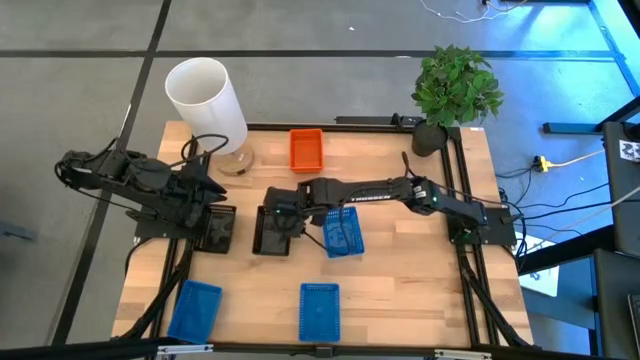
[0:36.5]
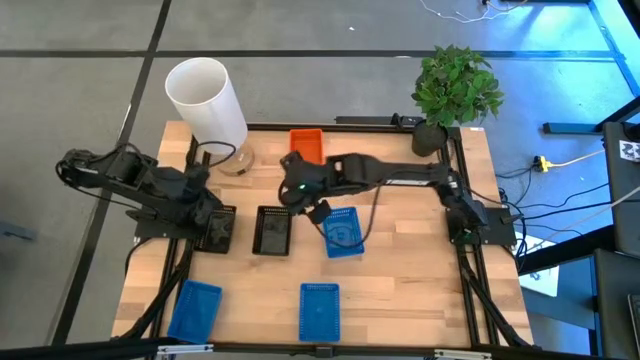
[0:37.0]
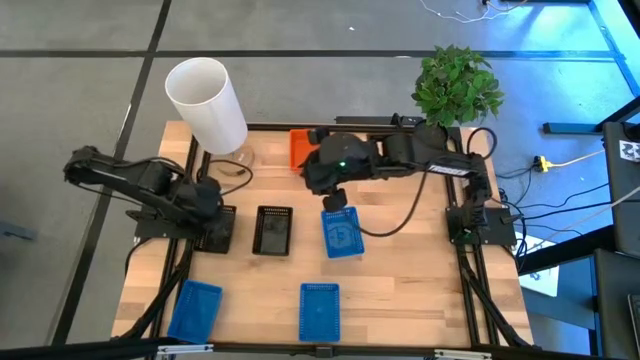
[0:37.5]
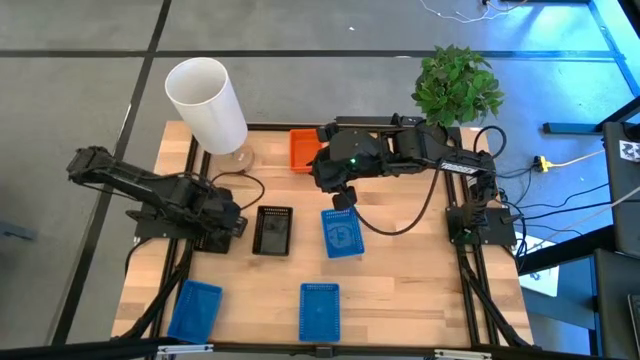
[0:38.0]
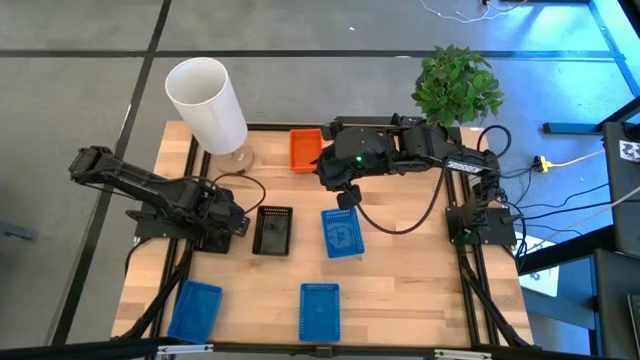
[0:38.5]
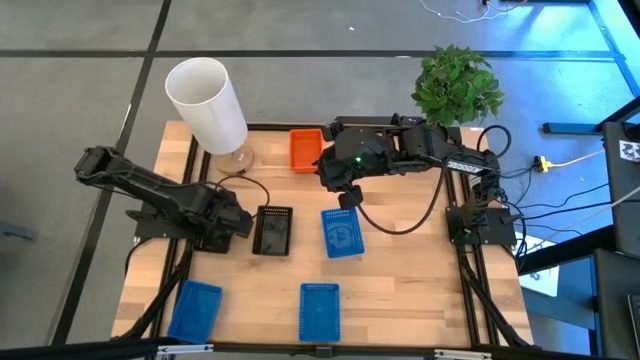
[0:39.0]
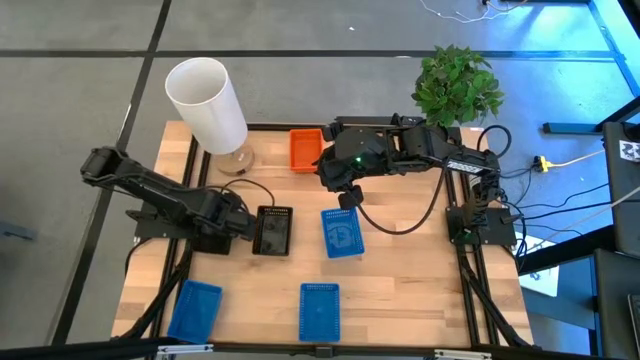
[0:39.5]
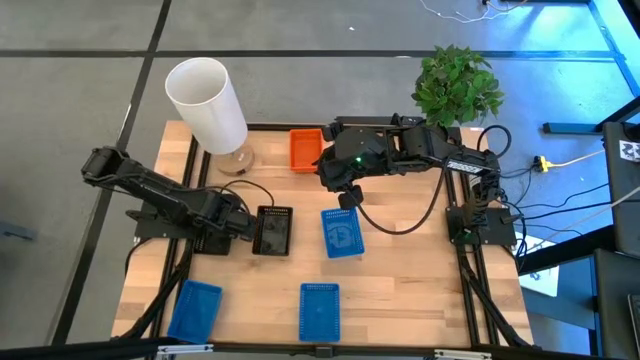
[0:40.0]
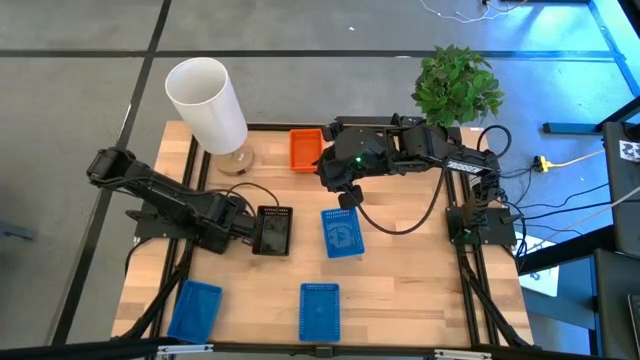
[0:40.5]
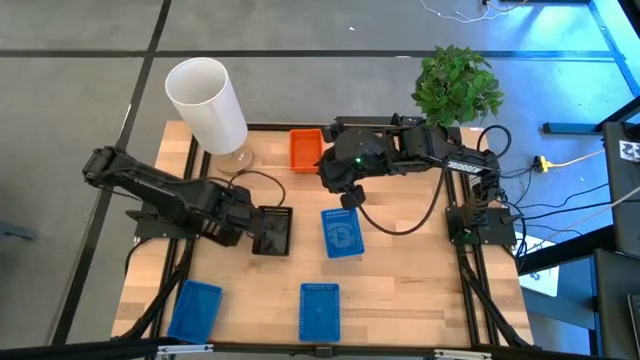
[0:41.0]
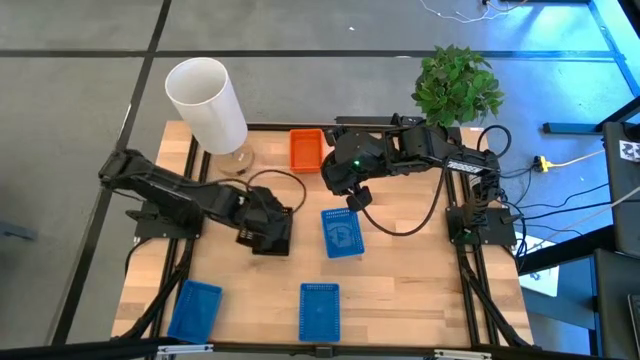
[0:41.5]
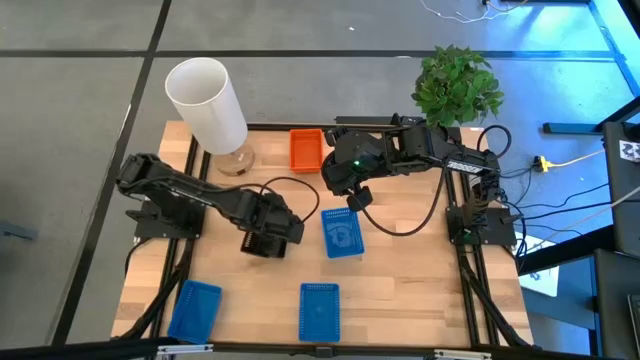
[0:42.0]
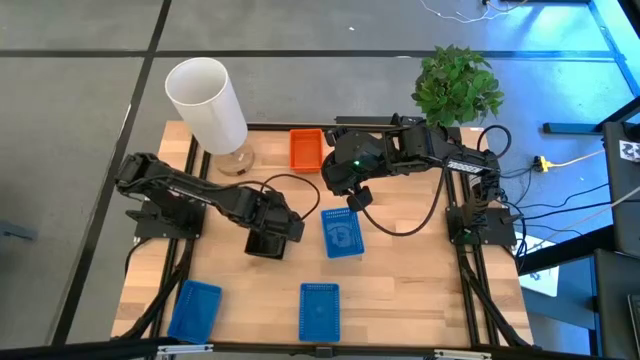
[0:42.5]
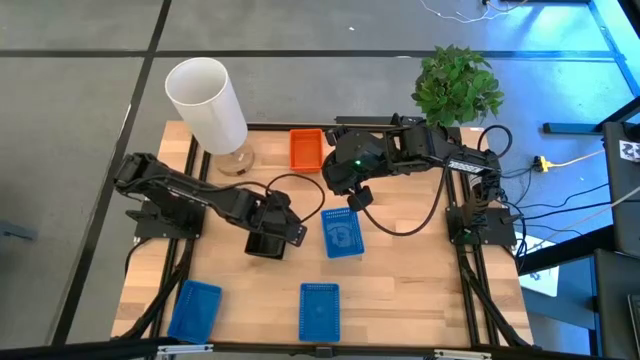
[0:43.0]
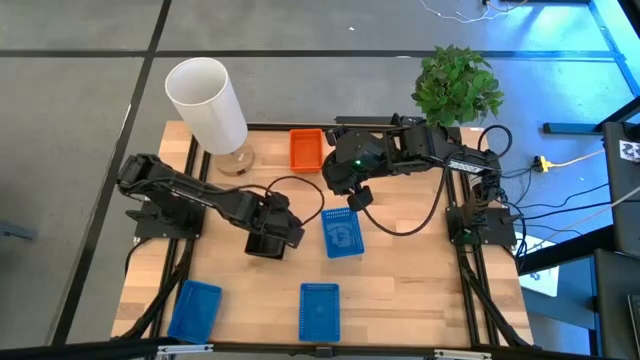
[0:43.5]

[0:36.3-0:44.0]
Stack the left black bin on top of the right black bins

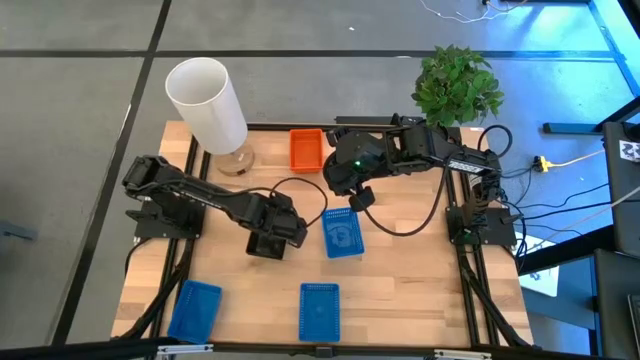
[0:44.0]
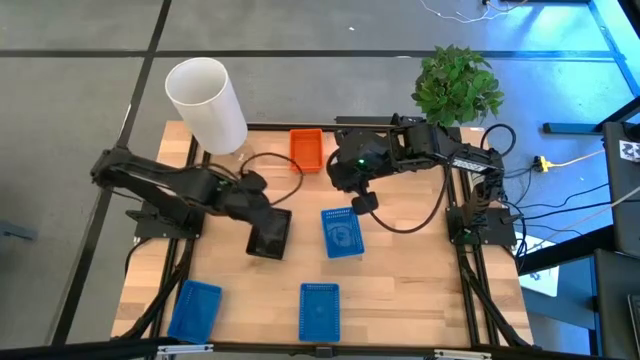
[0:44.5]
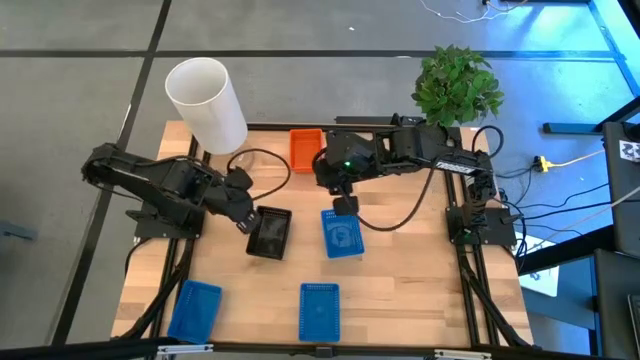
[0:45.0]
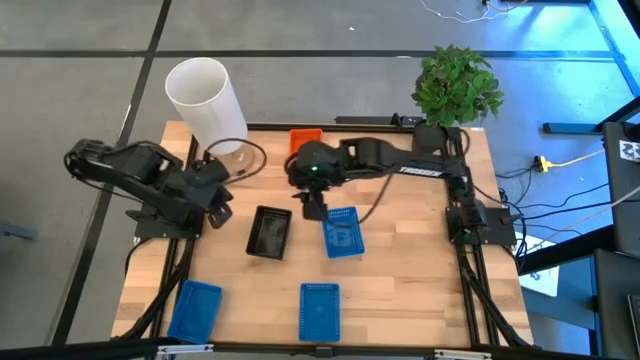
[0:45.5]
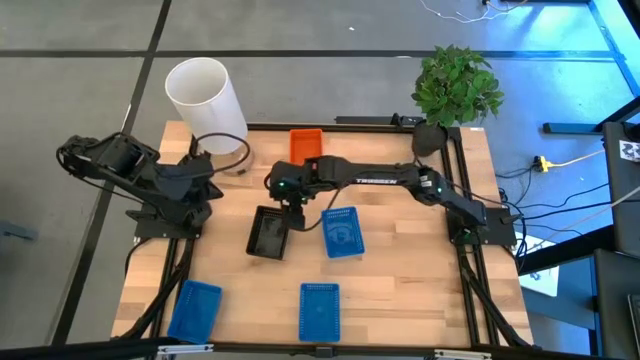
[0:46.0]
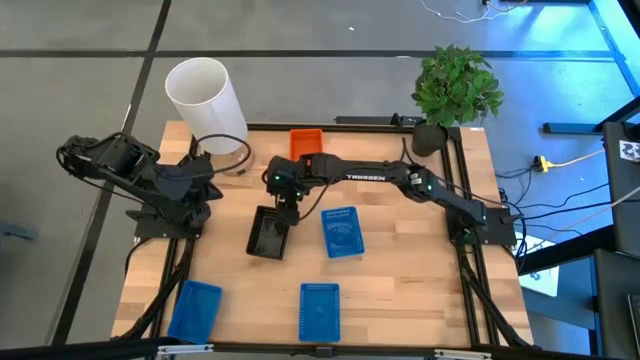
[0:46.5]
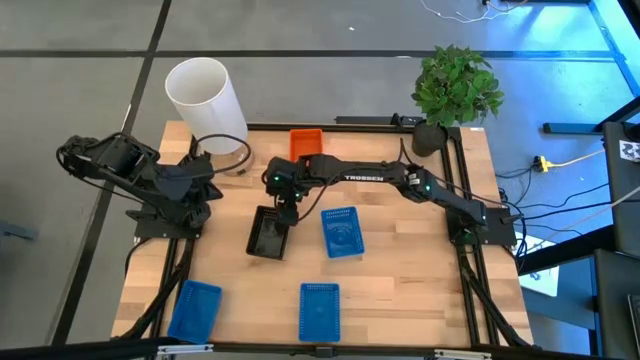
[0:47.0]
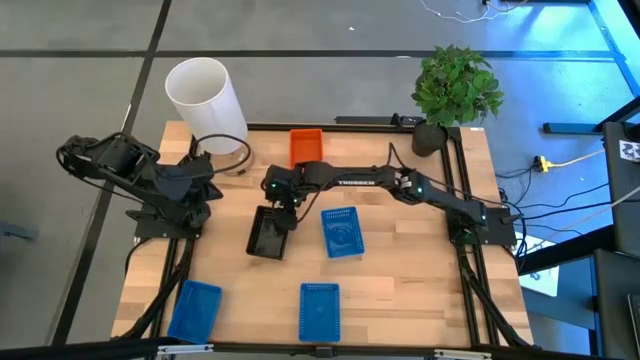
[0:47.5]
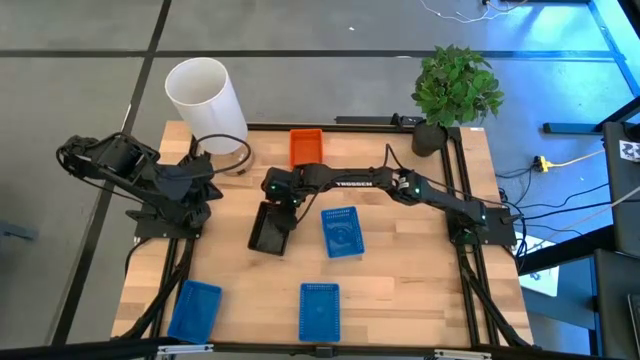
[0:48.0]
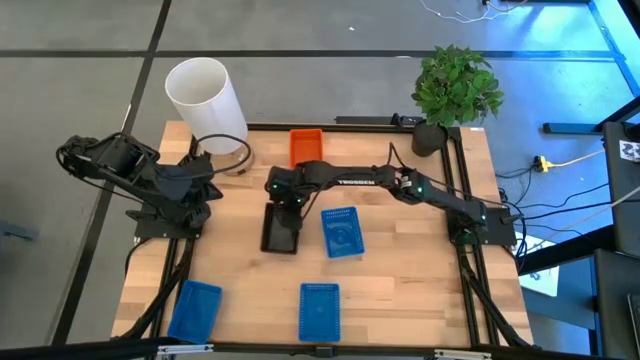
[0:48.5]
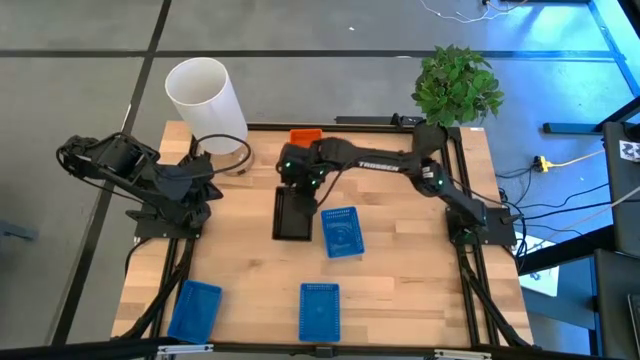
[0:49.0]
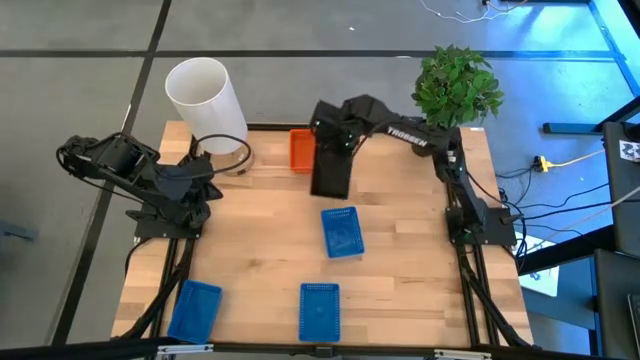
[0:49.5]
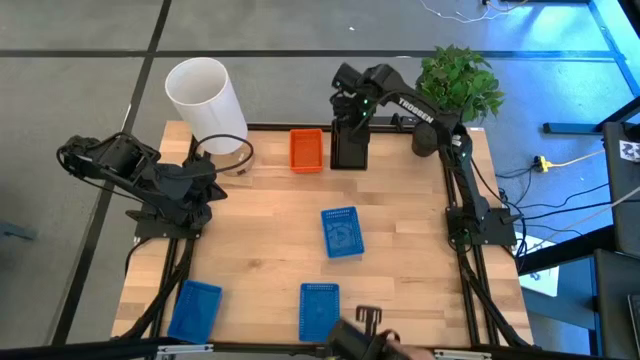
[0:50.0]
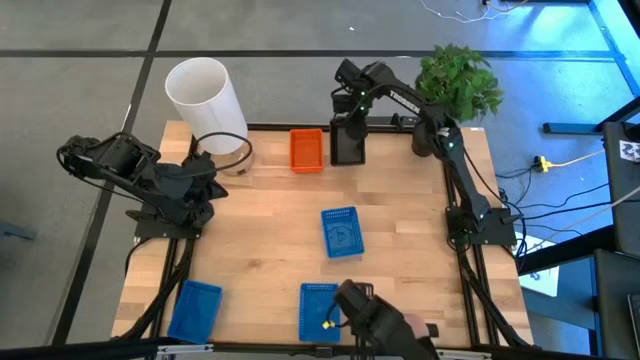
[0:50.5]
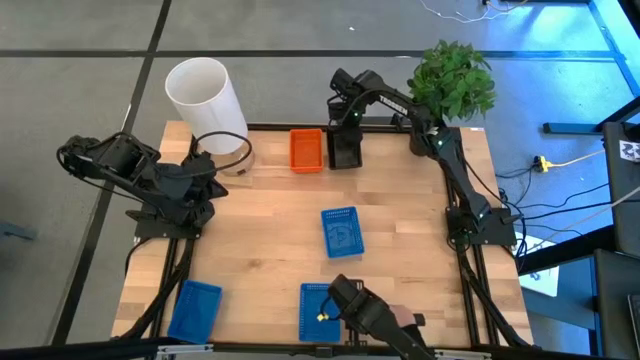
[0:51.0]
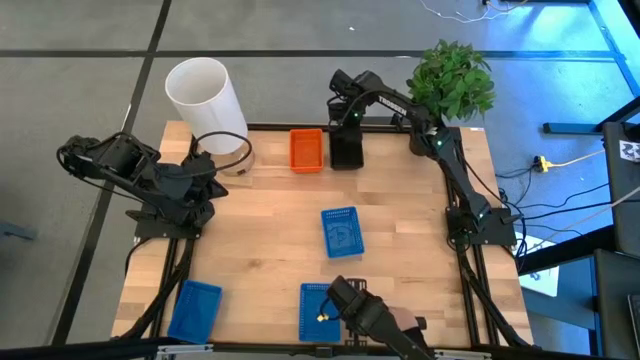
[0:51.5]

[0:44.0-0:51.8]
Move the stacked black bins to the top center of the table

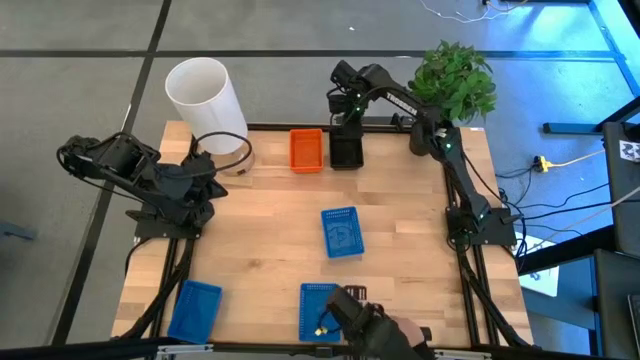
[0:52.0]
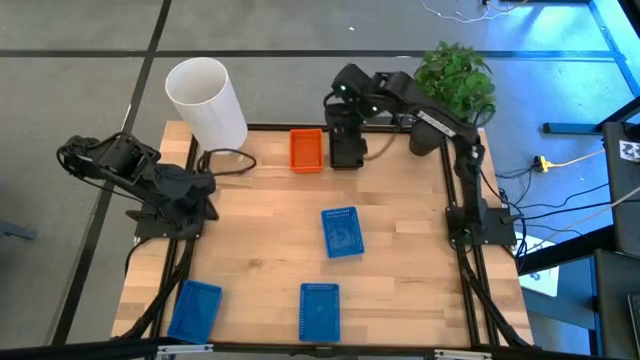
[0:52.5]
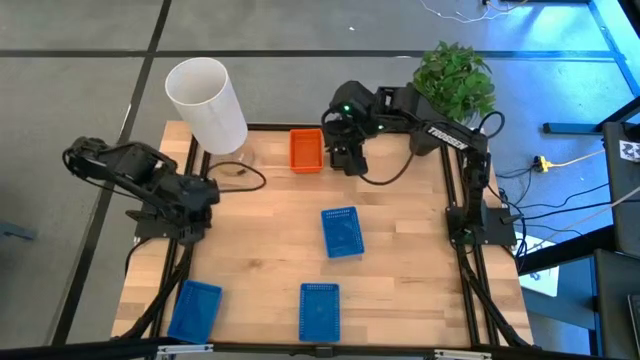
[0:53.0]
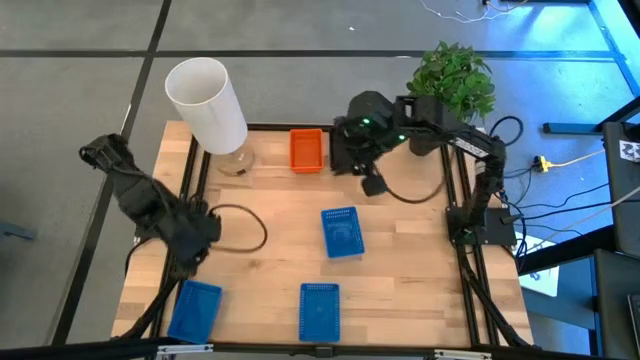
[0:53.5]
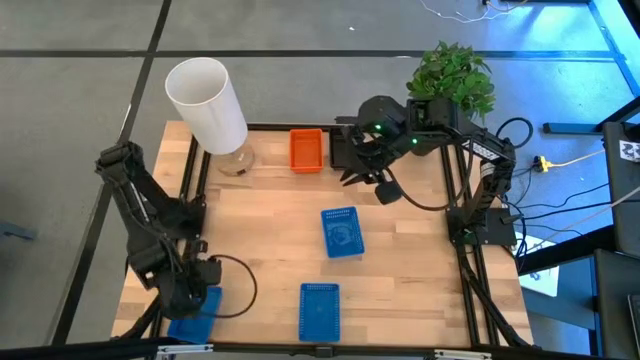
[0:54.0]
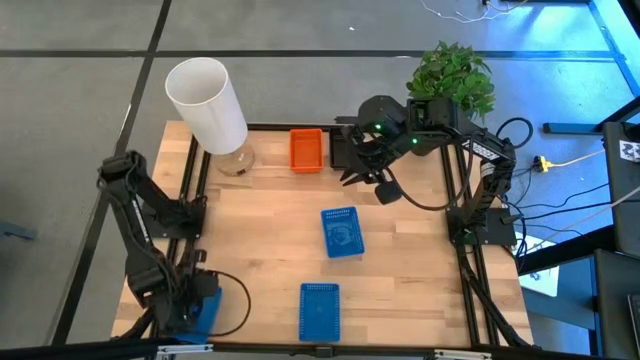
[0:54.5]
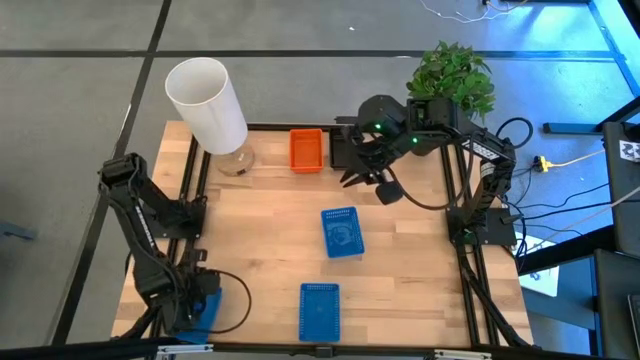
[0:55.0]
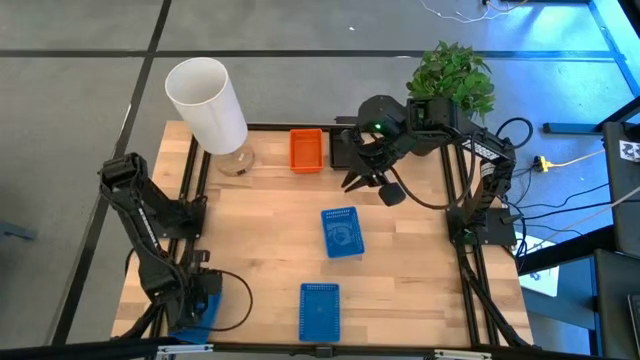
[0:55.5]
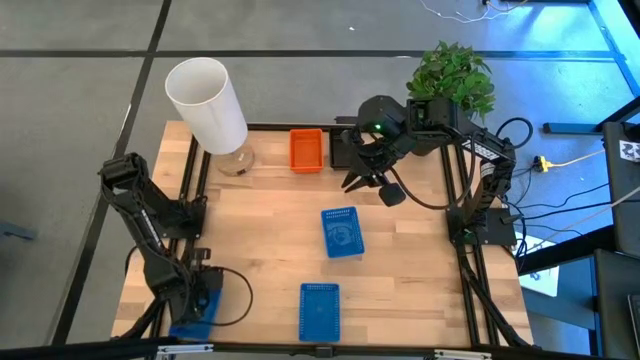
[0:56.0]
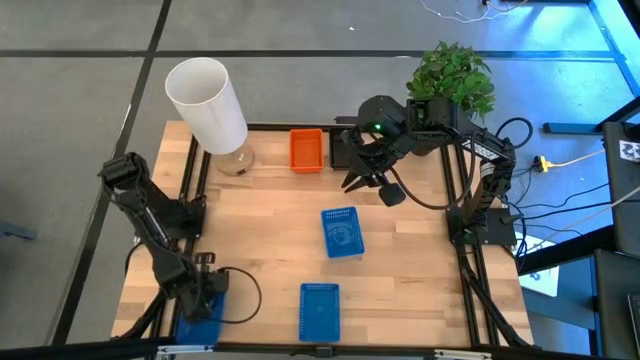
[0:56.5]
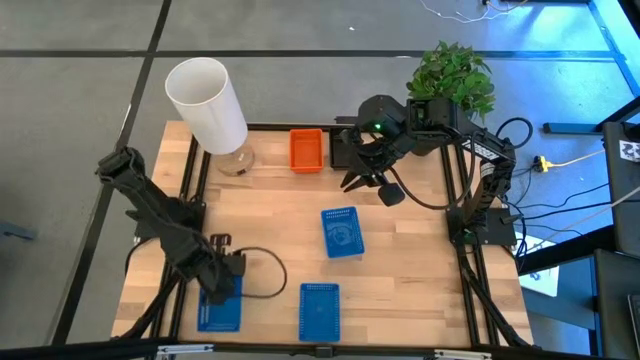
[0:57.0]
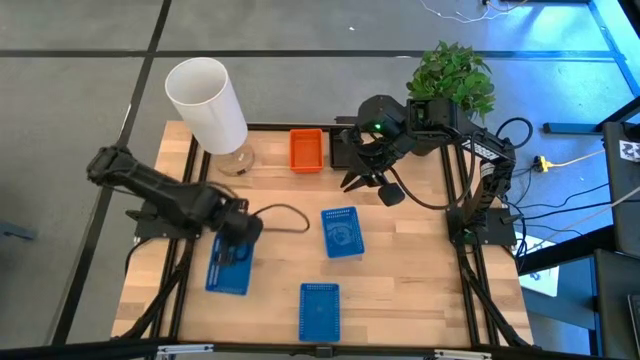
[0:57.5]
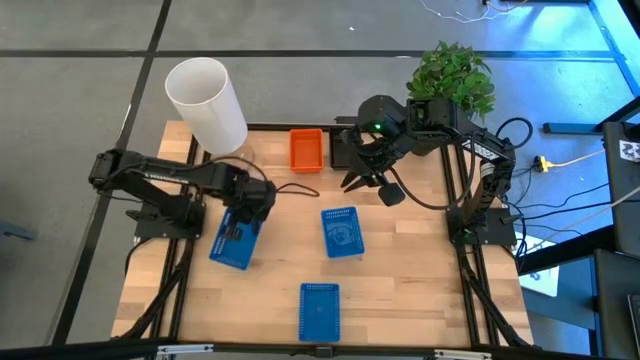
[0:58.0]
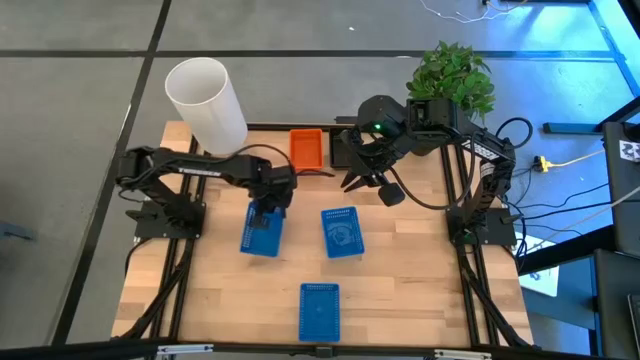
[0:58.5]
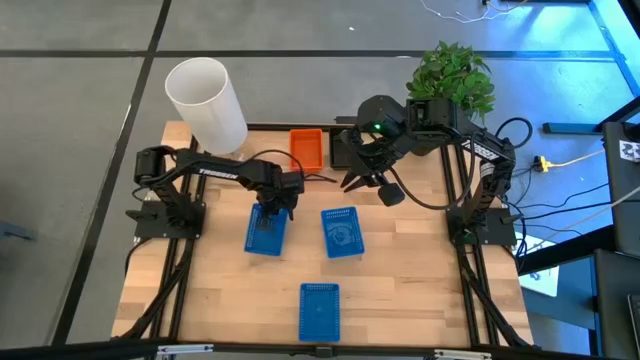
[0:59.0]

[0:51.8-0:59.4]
Move the bottom left blue bin to the middle left of the table
